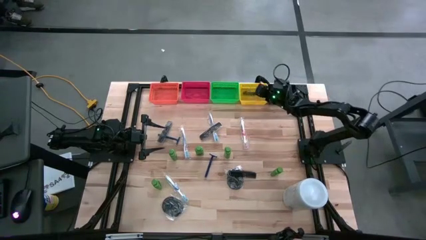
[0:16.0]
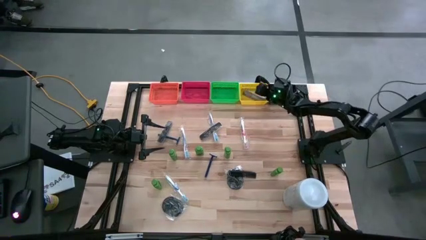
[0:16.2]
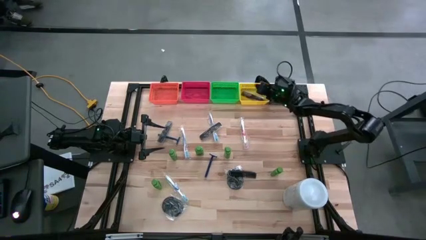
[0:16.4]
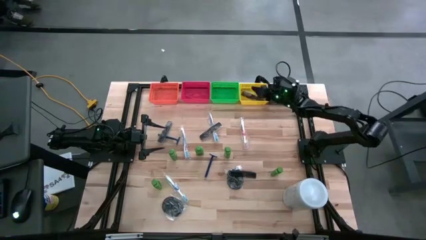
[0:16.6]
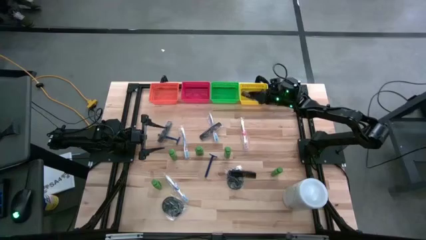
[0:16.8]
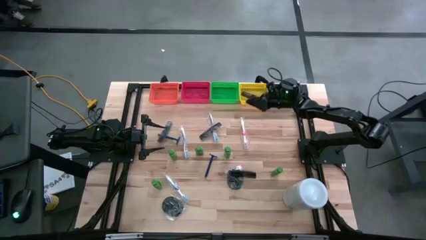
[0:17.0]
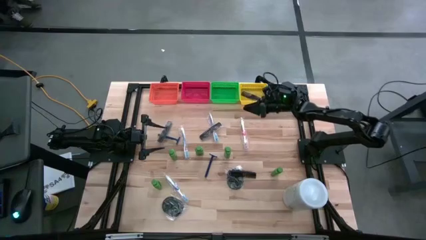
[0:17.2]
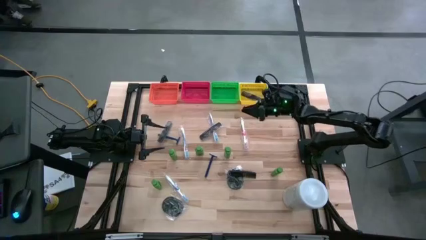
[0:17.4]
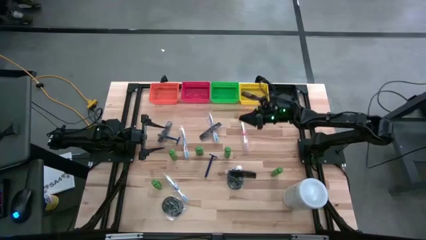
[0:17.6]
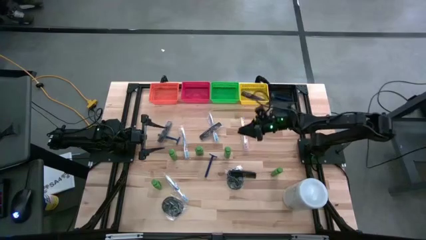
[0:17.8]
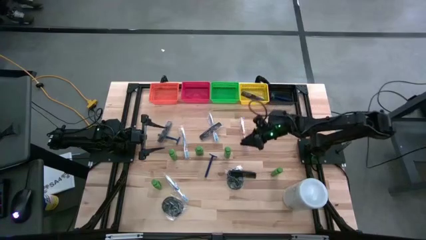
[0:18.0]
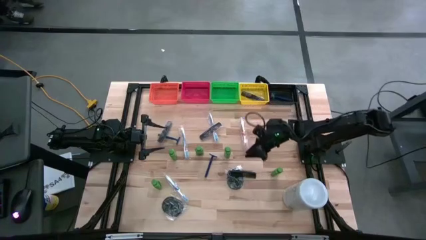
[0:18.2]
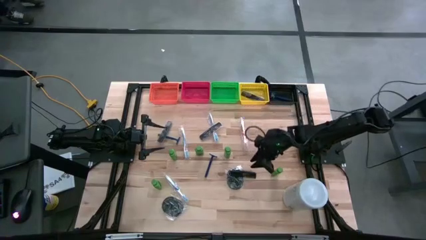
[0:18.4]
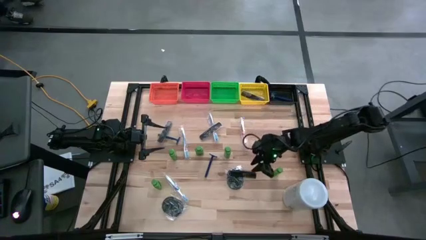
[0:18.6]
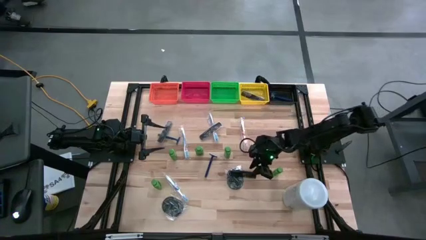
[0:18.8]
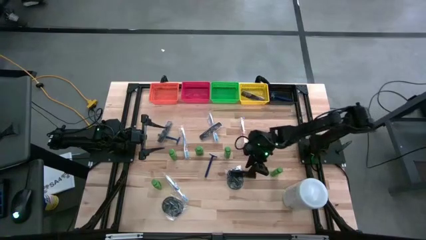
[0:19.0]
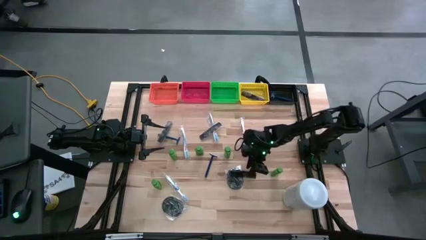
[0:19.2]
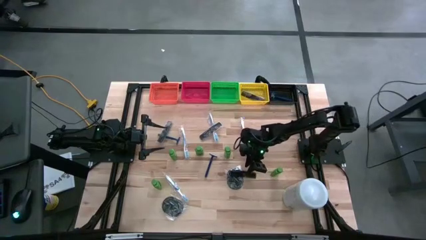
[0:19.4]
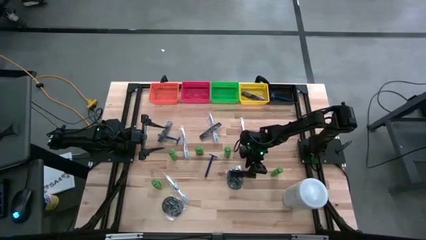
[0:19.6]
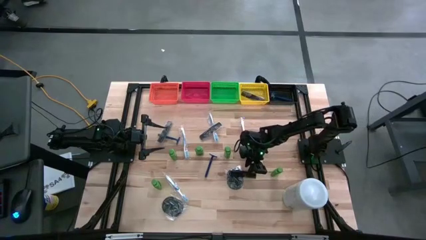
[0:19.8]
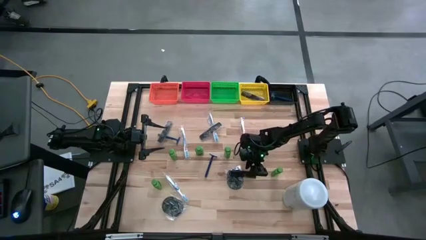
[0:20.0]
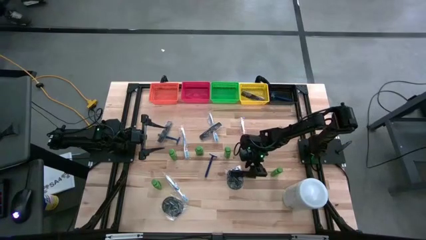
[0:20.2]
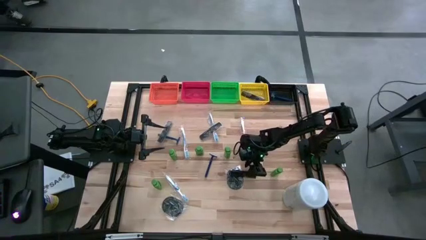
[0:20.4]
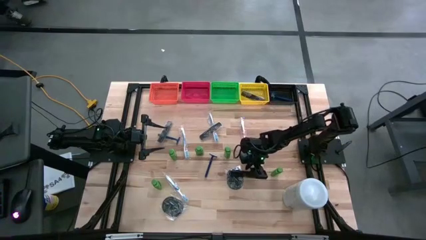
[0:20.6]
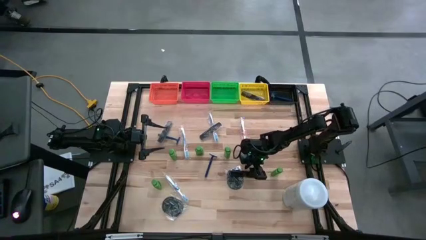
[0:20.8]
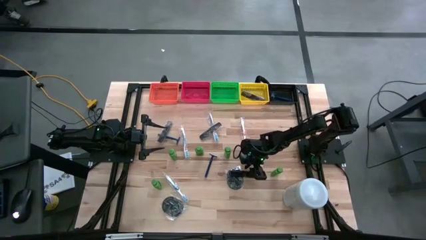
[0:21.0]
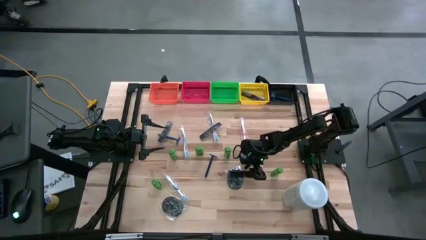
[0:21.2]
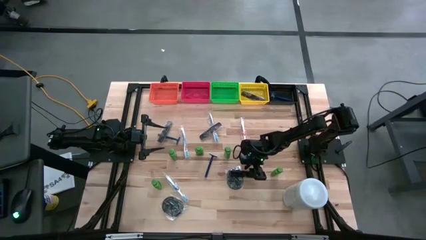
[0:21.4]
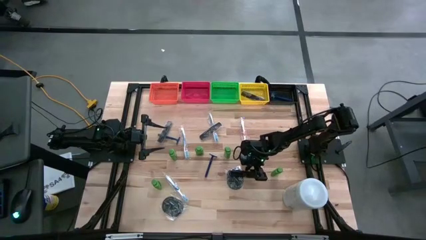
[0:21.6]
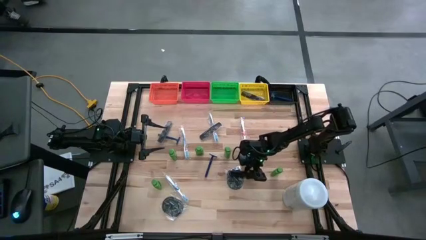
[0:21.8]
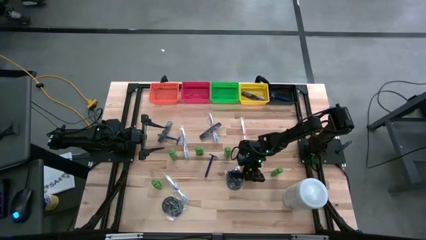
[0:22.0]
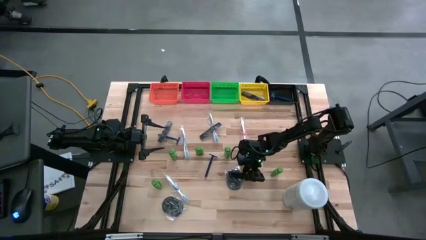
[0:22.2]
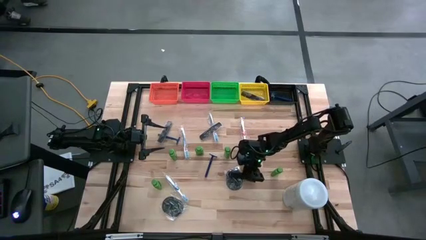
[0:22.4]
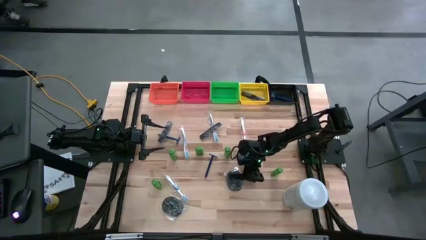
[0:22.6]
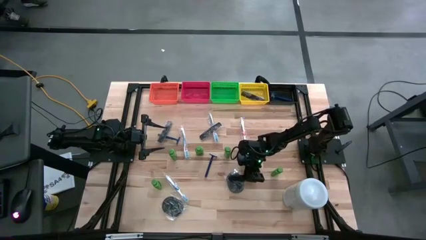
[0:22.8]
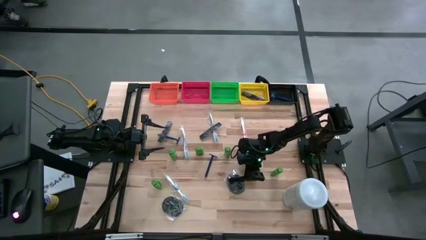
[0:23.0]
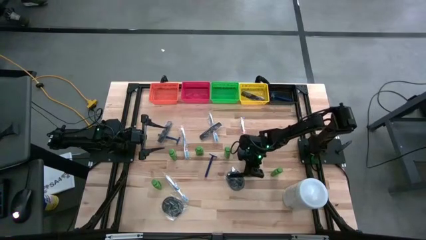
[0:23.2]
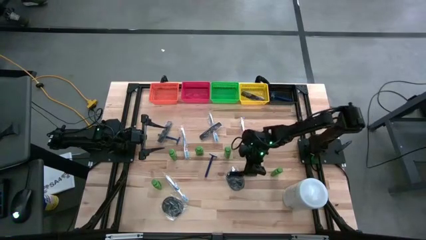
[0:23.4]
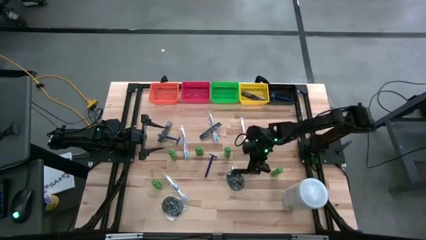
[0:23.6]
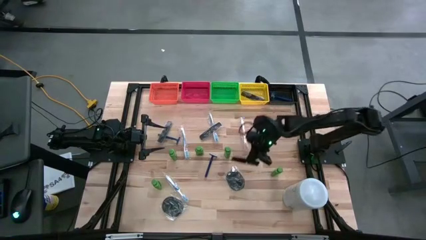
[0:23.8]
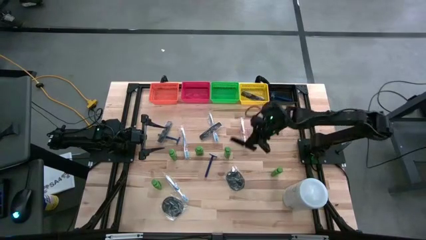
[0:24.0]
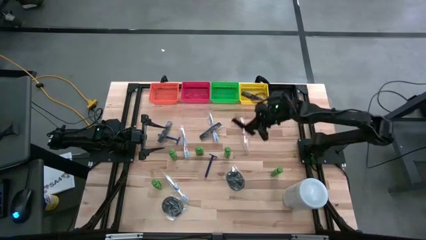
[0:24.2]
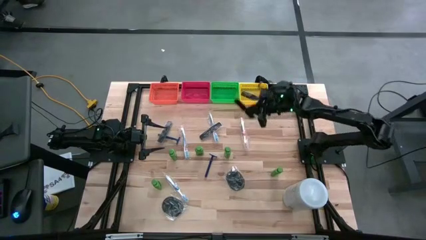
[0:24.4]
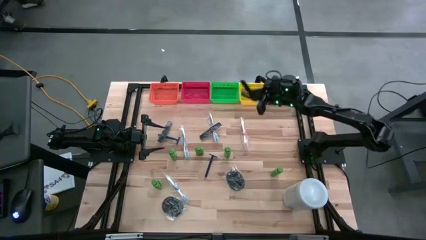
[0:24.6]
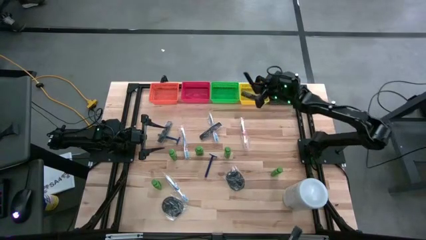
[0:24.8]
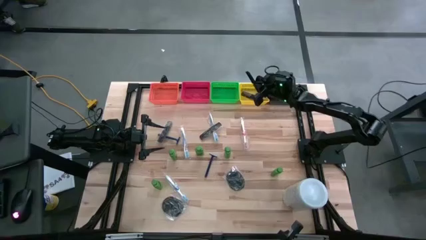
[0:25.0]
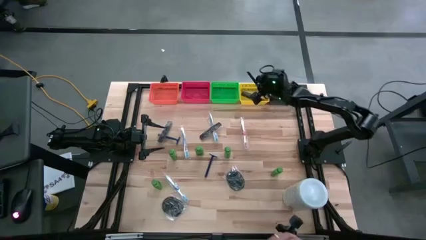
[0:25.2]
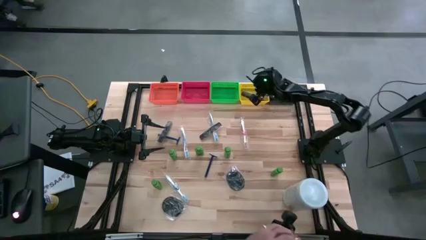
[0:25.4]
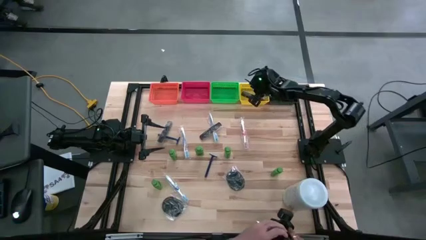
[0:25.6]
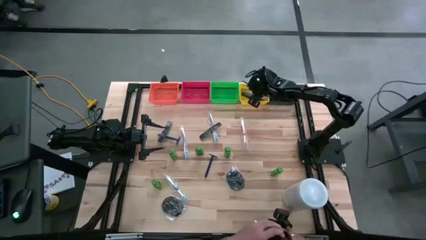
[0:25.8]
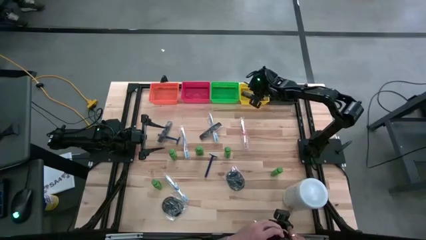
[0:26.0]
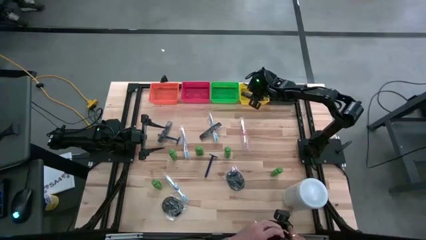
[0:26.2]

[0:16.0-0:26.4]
Task: Pick & Place Travel size toiletries
Put the black hair comb into the yellow bin

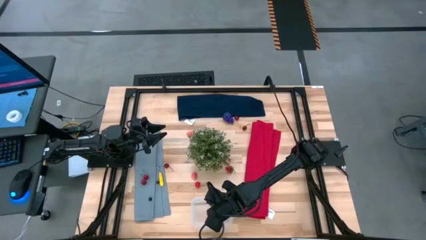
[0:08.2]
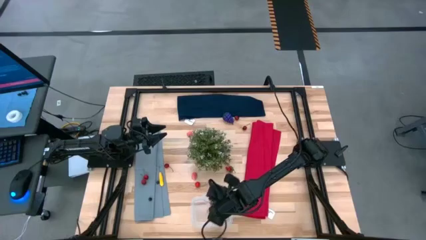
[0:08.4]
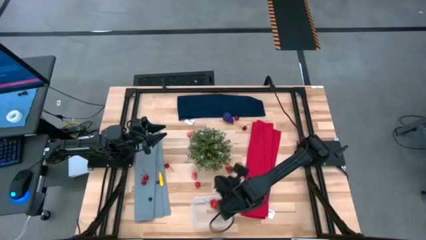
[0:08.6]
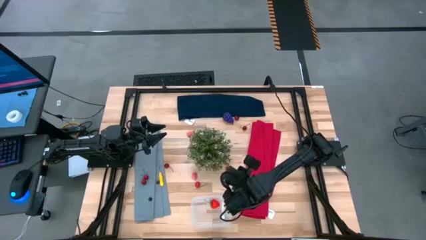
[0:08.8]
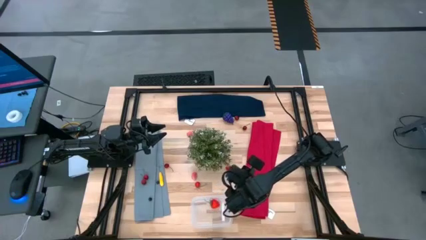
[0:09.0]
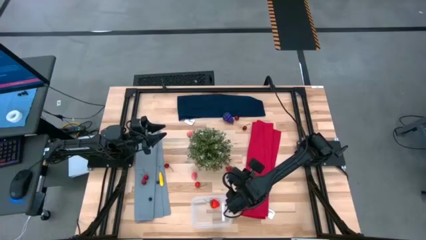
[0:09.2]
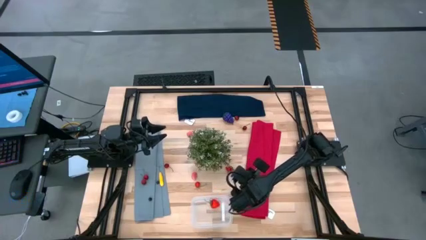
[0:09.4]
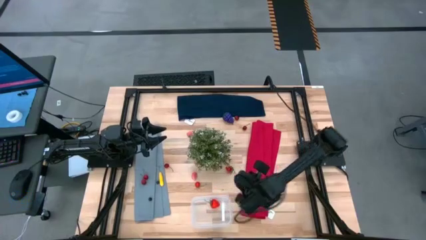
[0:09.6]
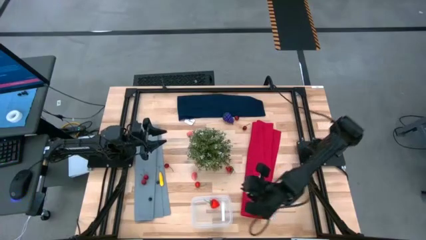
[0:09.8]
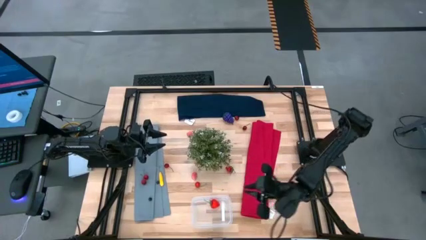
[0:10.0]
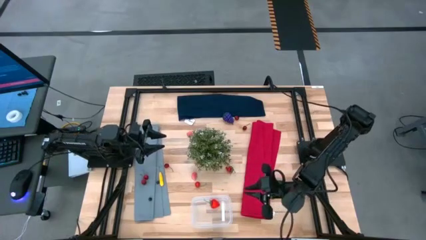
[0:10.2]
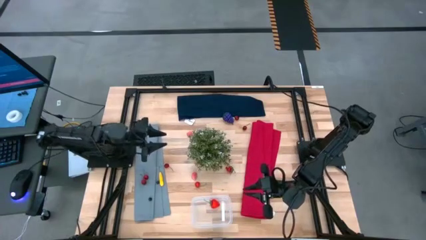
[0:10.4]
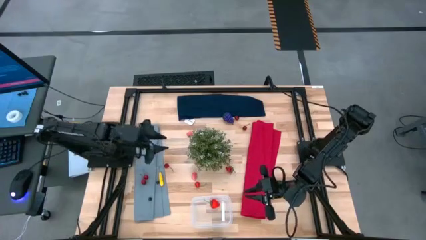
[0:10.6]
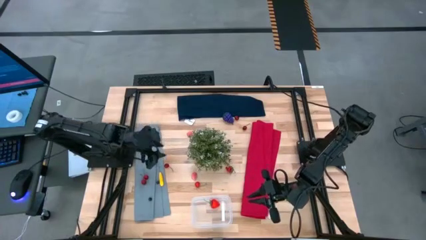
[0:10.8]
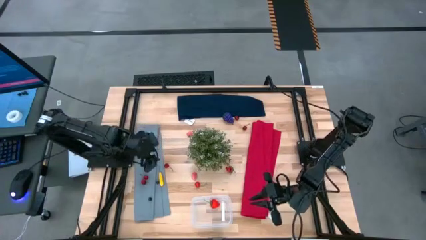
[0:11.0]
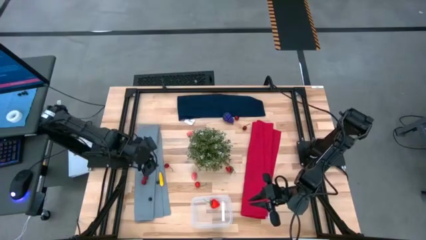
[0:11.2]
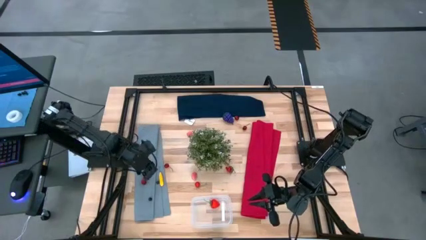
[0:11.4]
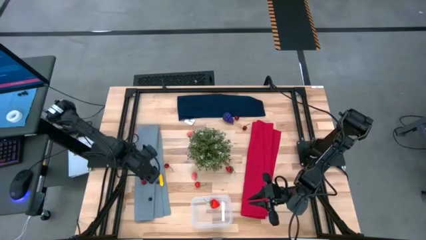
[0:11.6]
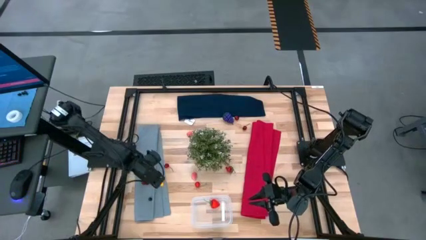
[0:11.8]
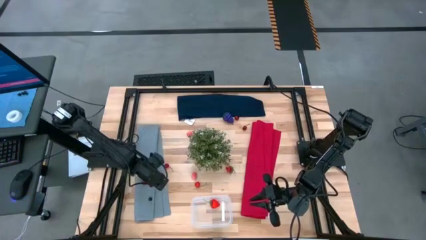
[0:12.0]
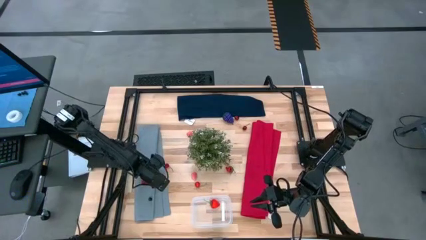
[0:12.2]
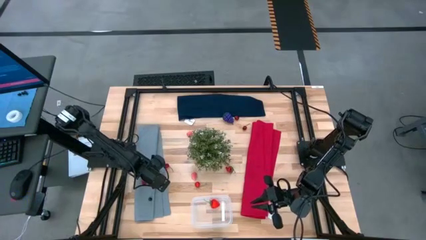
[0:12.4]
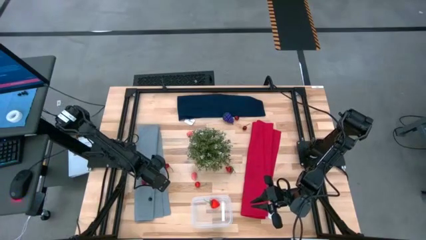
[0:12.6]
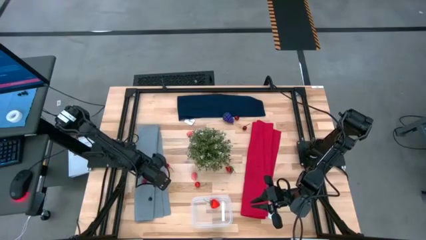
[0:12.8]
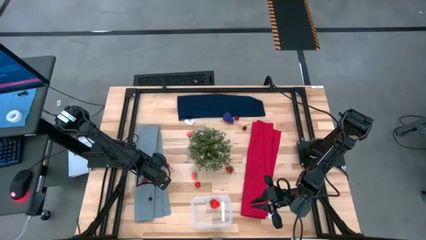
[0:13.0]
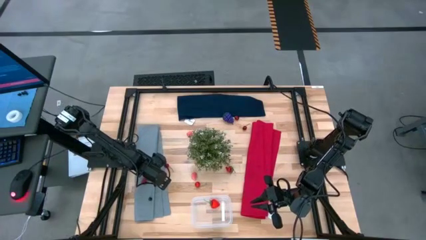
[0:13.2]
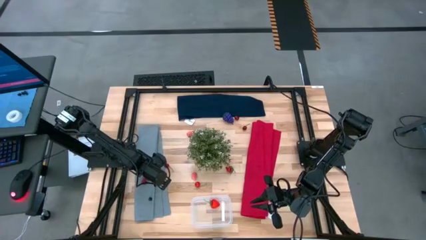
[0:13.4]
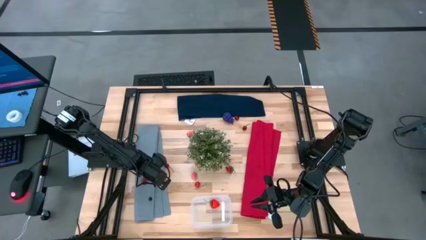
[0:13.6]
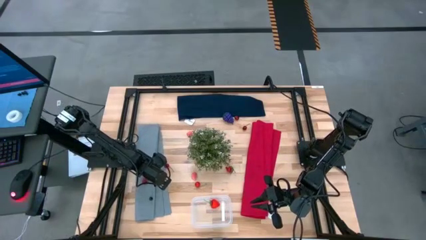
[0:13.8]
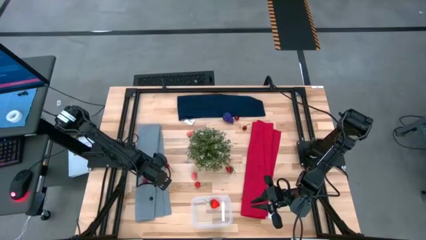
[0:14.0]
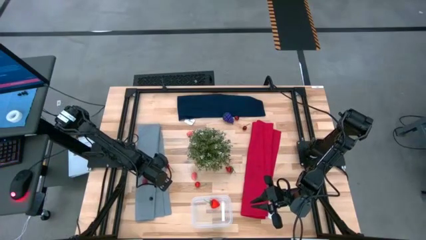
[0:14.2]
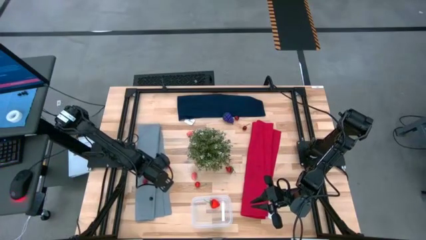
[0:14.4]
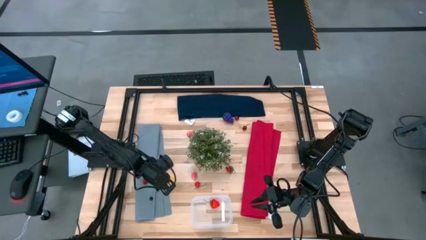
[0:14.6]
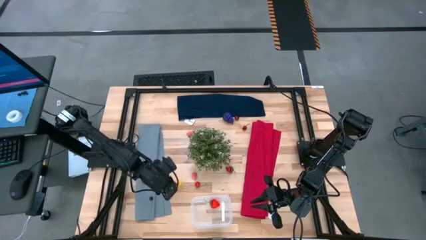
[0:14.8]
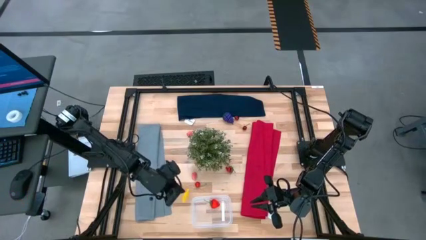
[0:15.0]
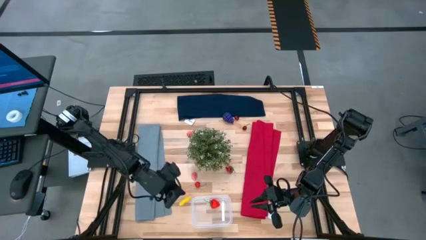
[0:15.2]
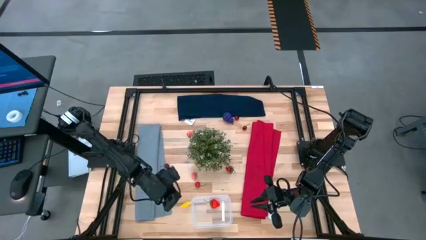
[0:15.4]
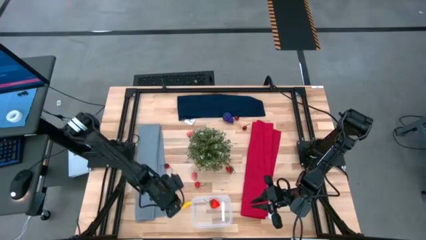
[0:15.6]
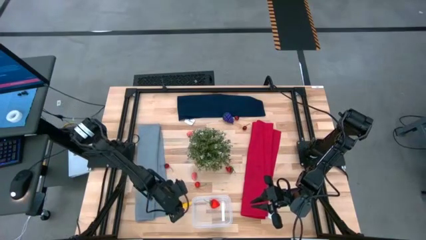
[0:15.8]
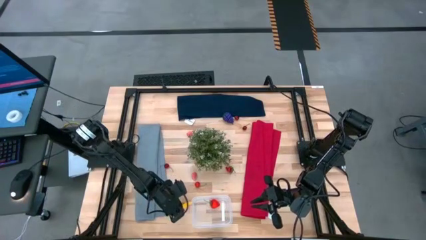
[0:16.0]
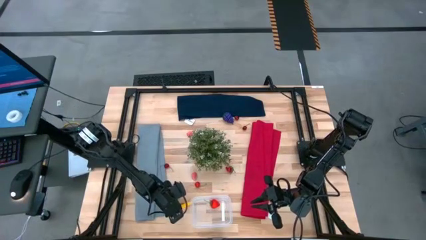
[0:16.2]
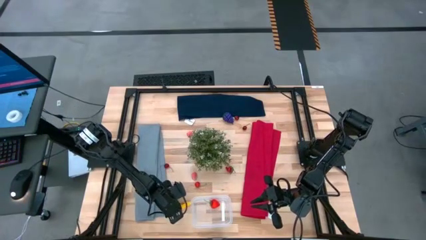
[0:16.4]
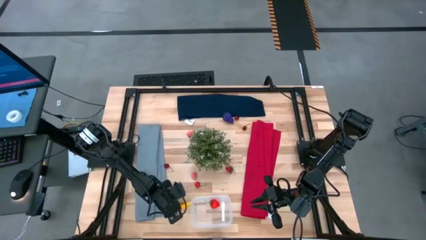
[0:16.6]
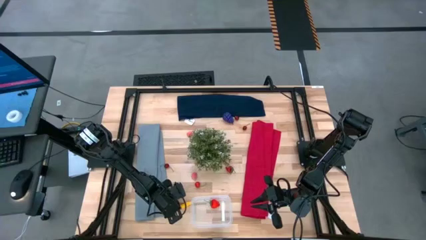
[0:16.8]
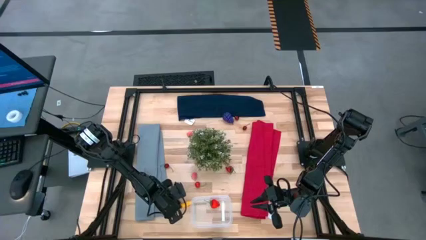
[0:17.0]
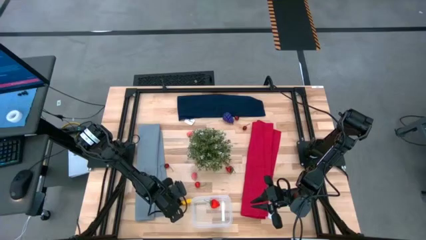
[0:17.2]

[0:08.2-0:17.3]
Task: Pick and placing Produce into tupperware
Put the corn into the transparent container
